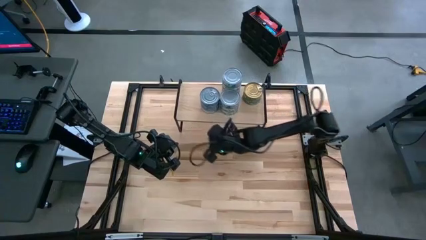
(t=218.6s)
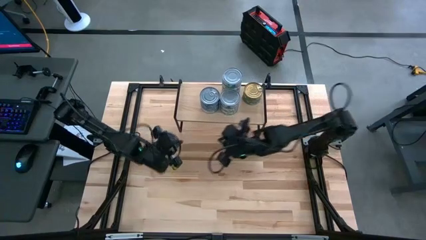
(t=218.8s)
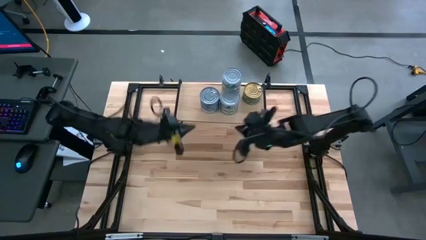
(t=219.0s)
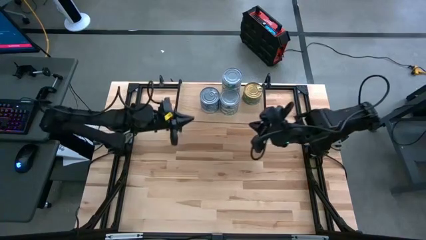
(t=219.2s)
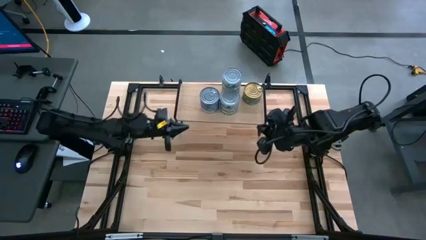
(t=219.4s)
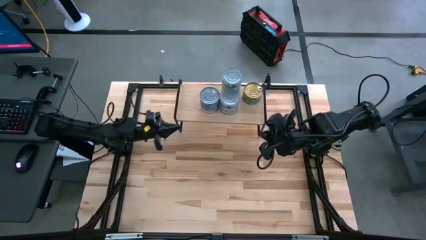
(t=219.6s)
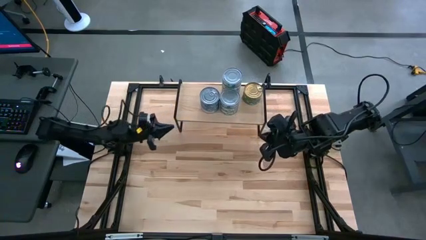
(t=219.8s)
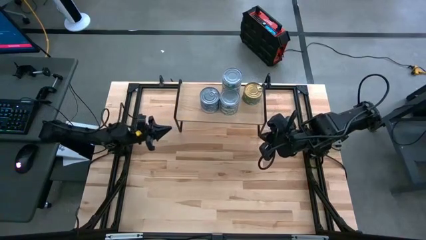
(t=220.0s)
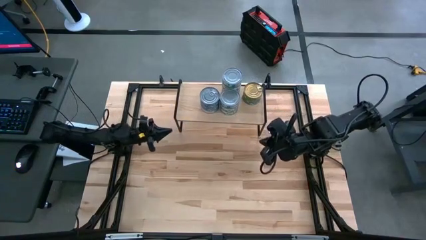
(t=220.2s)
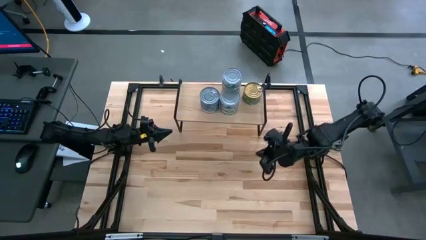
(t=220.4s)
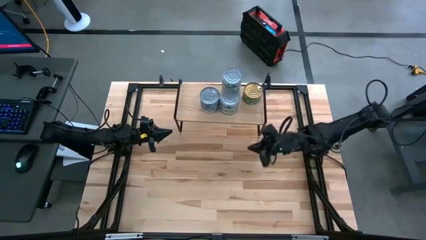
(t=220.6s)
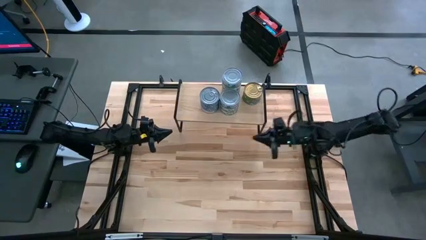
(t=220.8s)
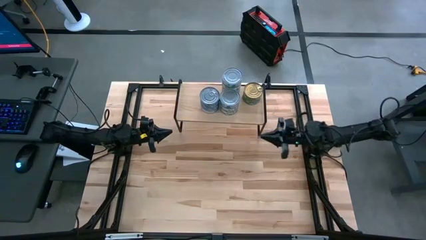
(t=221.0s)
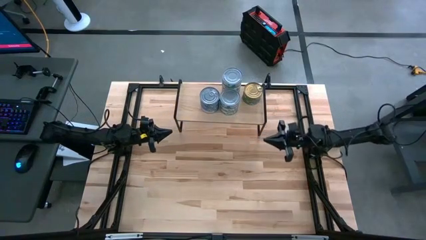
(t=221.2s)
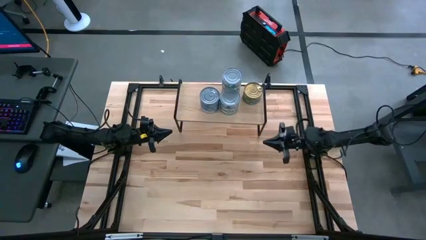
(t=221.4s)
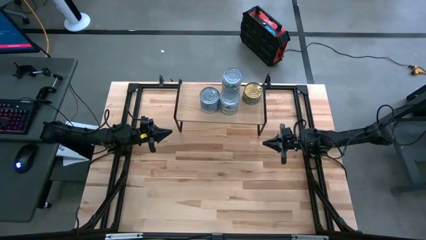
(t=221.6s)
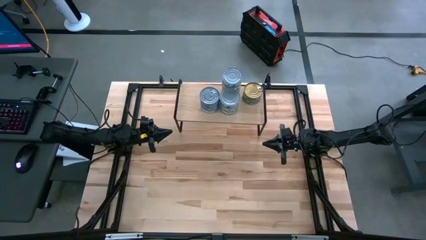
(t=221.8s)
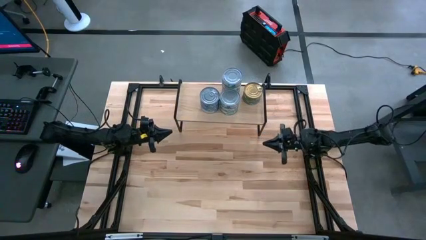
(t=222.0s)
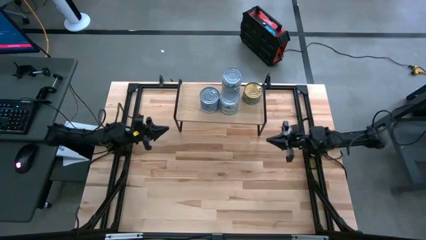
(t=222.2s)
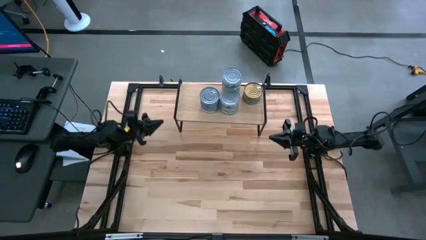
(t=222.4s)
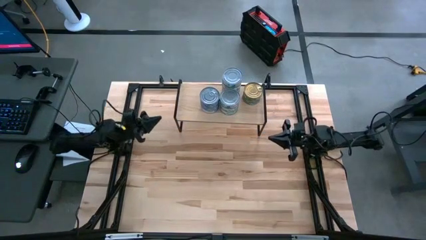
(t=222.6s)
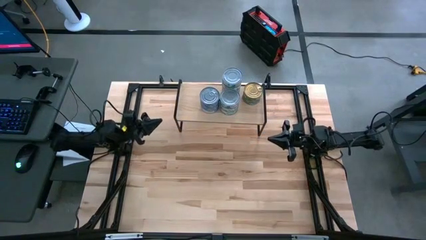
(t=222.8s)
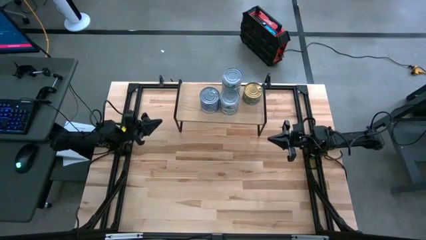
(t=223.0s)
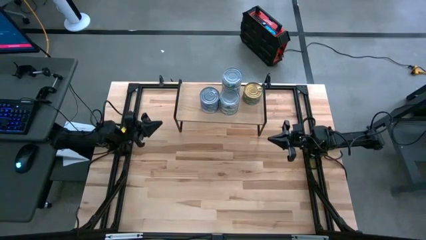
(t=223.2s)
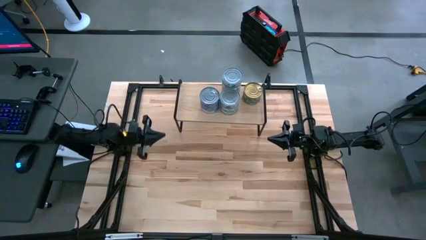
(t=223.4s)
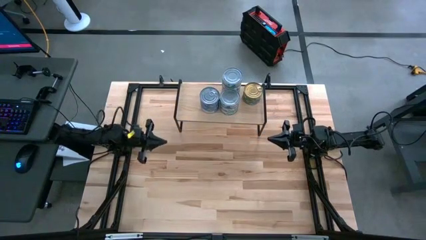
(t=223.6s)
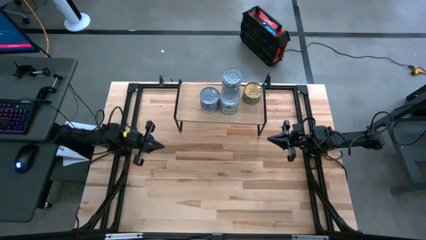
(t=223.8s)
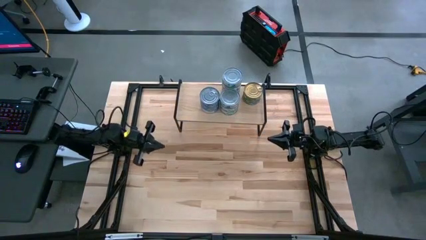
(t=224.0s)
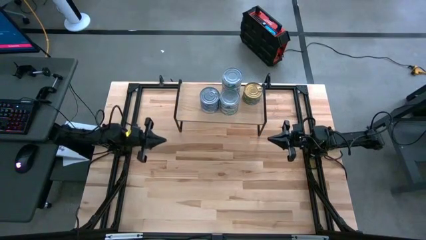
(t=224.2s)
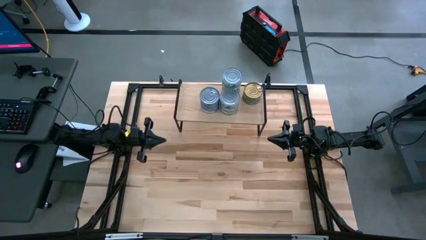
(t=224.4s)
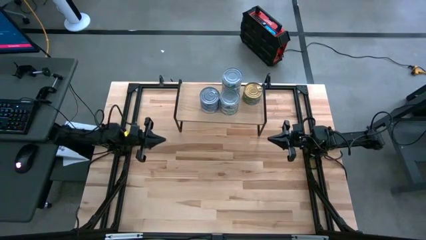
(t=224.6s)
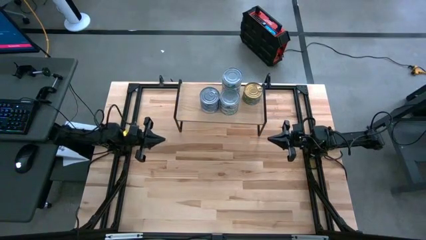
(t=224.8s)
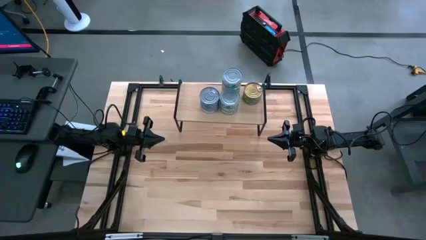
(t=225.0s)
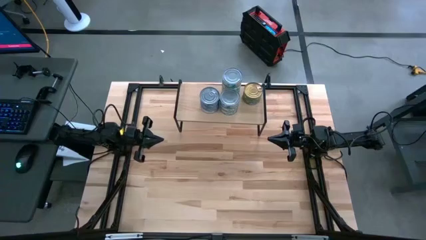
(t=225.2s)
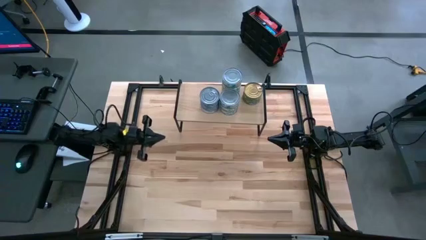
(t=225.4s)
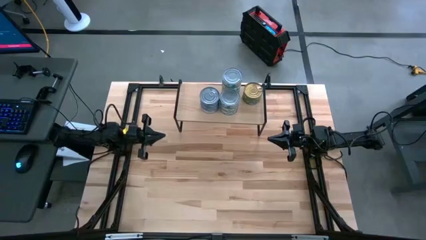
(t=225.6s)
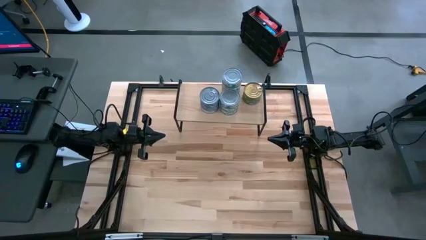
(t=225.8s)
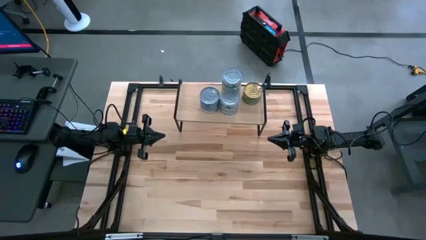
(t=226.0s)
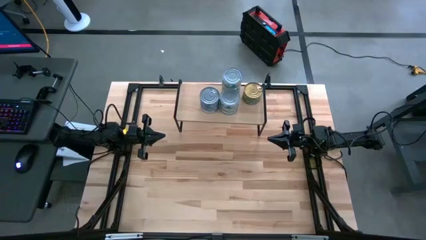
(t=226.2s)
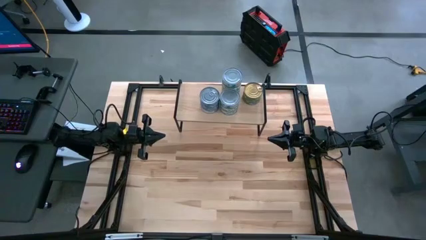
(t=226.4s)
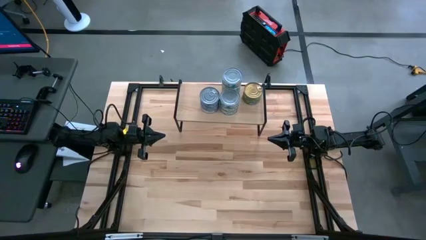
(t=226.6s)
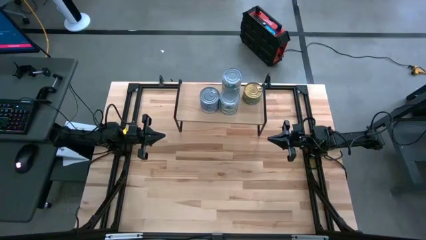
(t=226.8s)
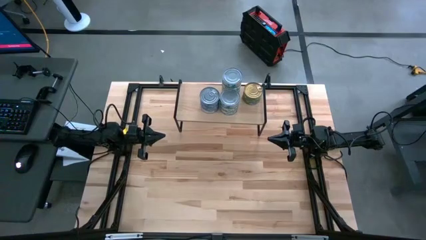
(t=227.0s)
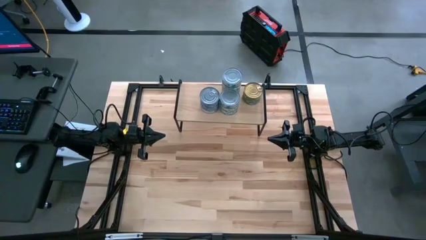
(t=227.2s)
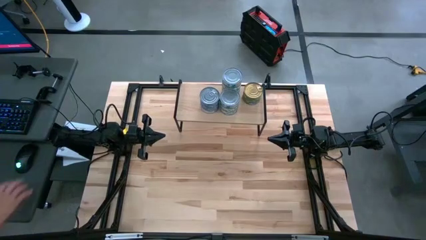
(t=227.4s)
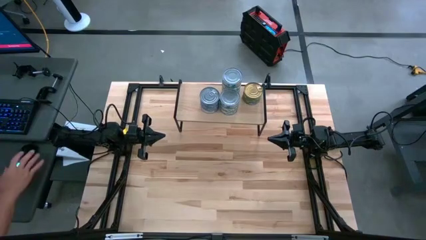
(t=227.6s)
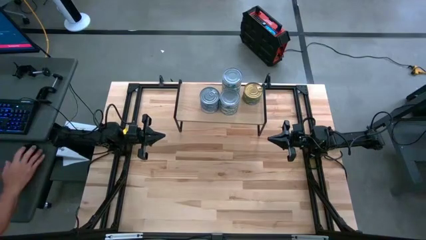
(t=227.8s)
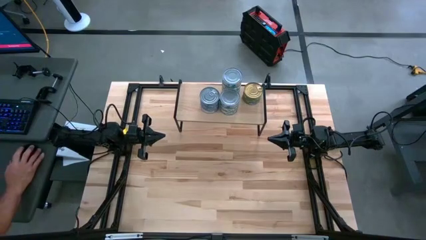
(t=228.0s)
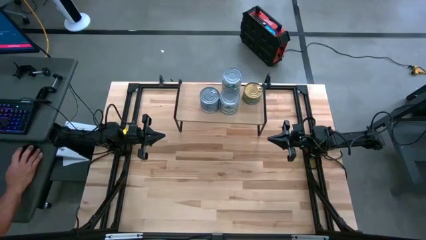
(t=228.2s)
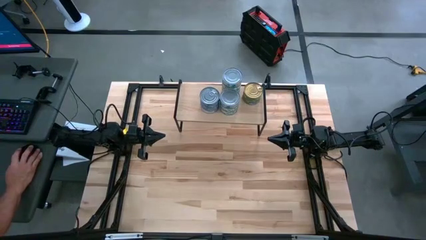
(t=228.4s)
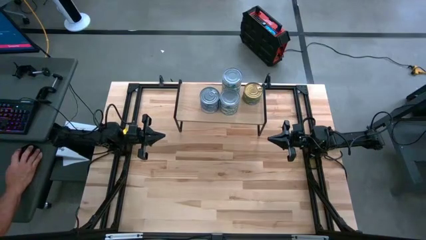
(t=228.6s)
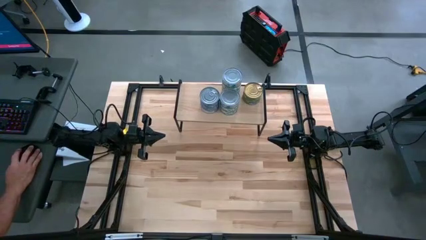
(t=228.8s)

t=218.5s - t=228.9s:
Task: Stack canned seafood by type on shelf
Return to Home Position

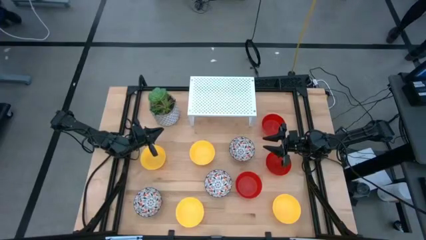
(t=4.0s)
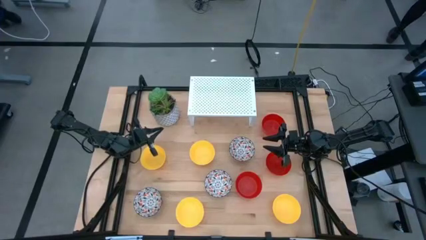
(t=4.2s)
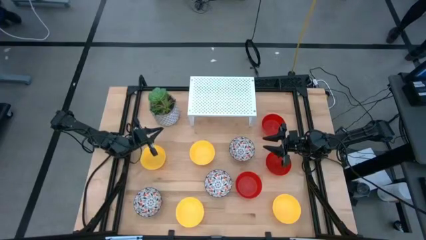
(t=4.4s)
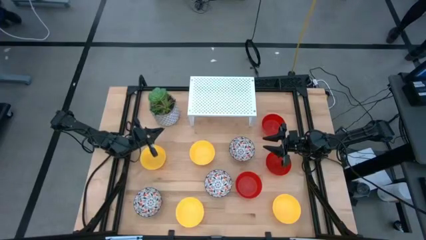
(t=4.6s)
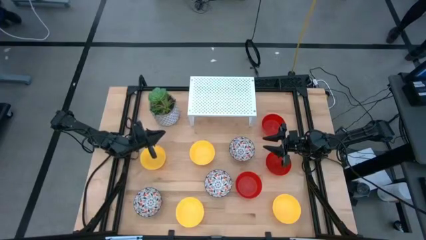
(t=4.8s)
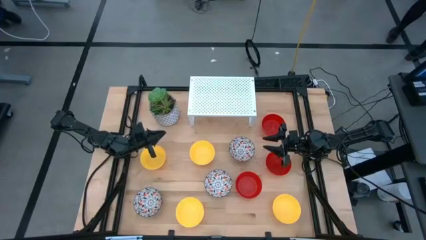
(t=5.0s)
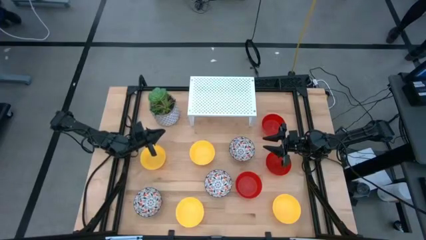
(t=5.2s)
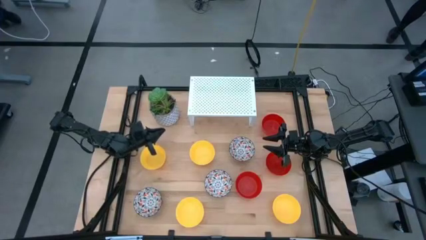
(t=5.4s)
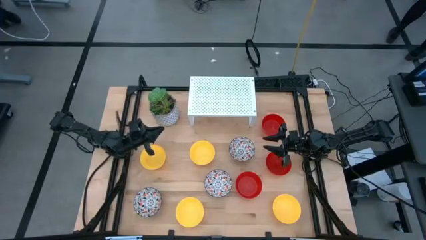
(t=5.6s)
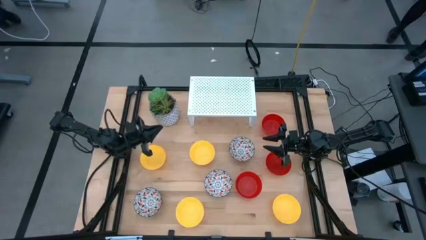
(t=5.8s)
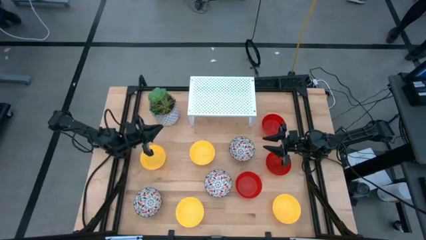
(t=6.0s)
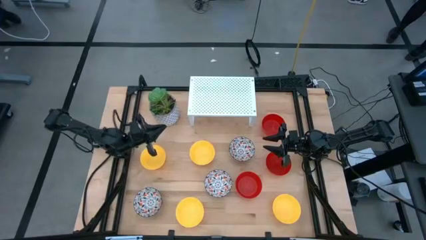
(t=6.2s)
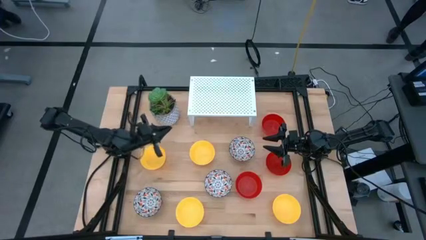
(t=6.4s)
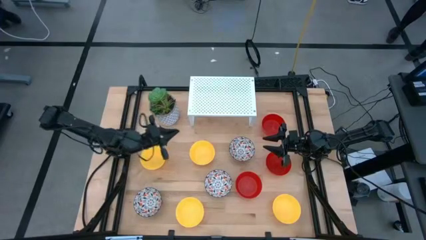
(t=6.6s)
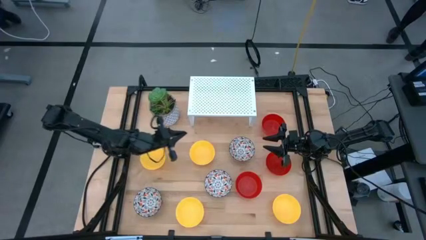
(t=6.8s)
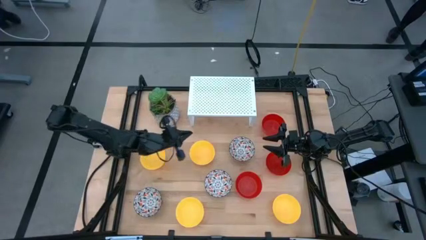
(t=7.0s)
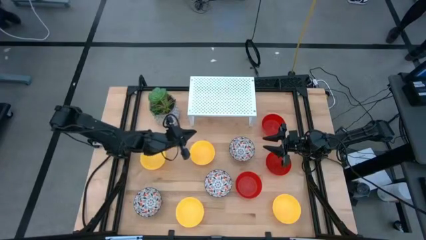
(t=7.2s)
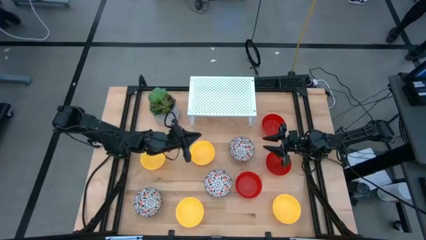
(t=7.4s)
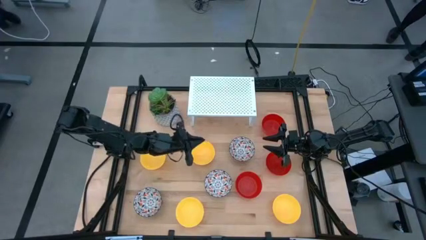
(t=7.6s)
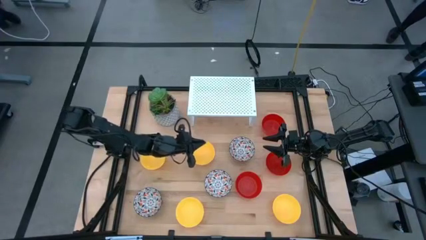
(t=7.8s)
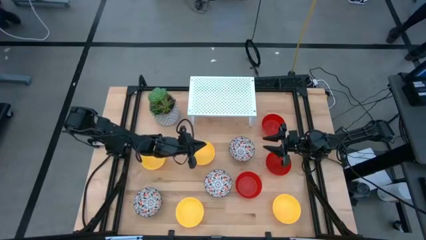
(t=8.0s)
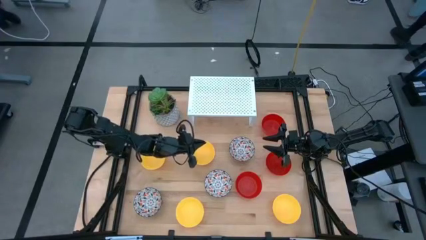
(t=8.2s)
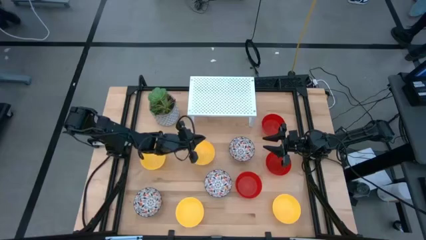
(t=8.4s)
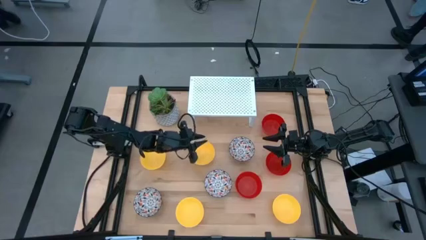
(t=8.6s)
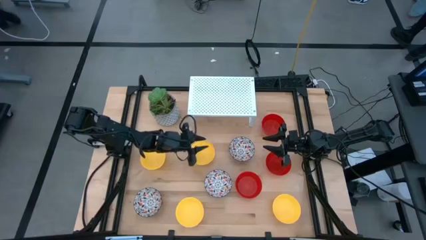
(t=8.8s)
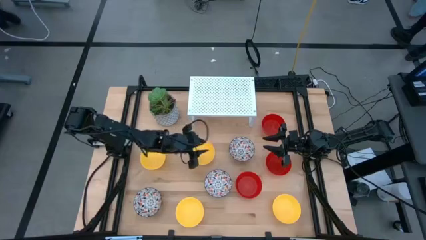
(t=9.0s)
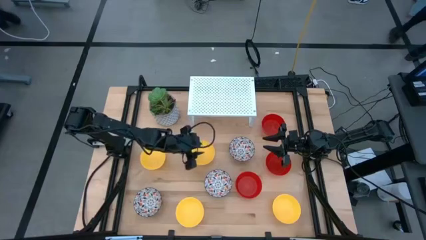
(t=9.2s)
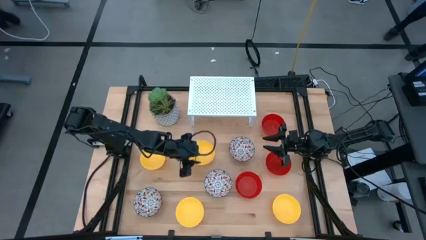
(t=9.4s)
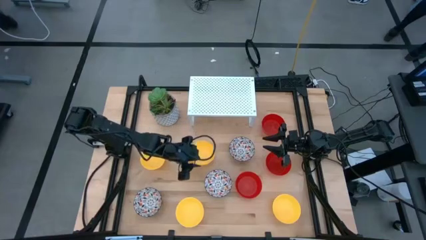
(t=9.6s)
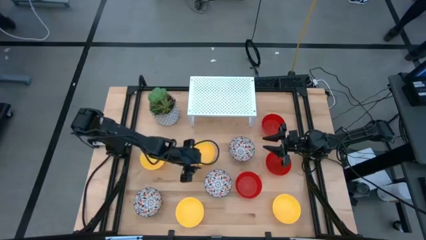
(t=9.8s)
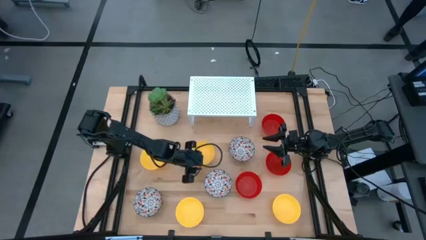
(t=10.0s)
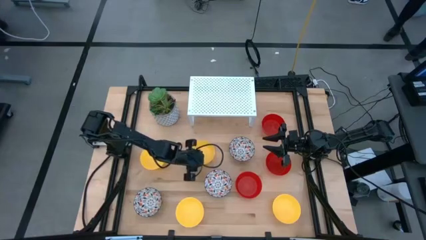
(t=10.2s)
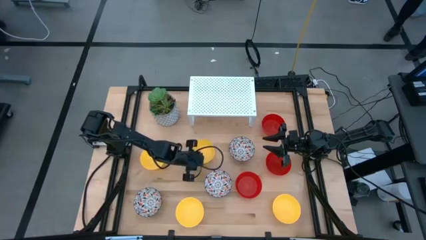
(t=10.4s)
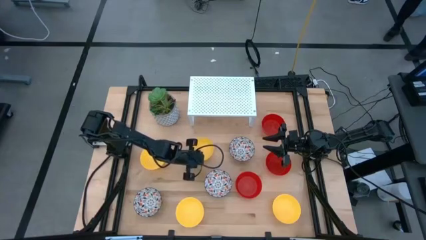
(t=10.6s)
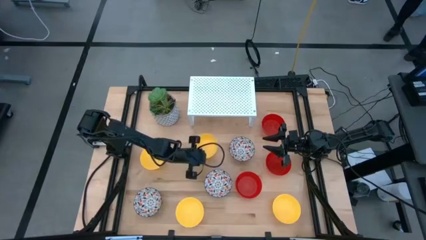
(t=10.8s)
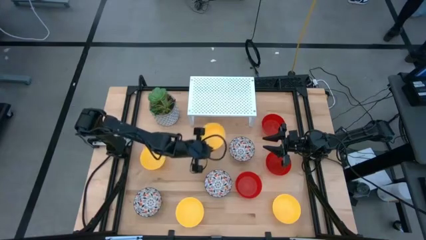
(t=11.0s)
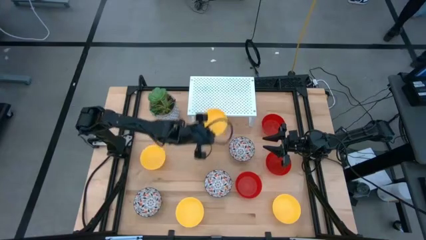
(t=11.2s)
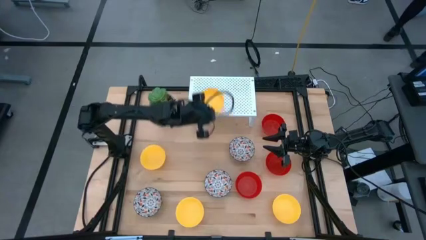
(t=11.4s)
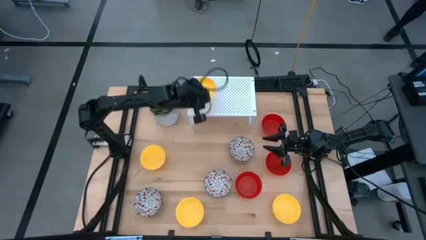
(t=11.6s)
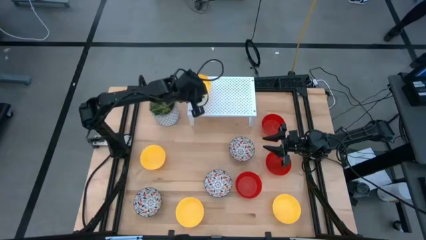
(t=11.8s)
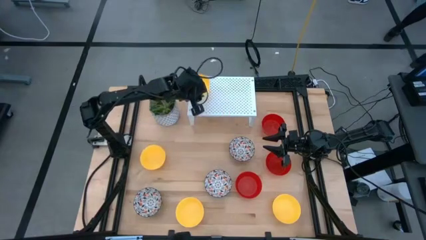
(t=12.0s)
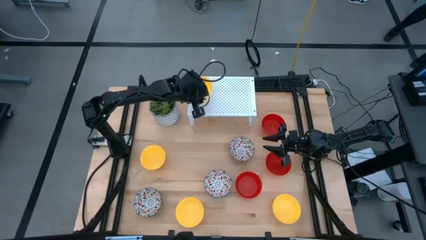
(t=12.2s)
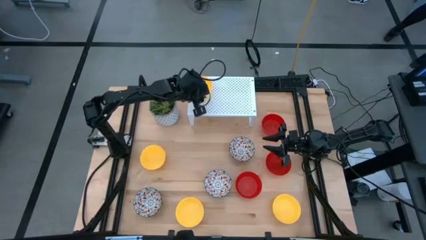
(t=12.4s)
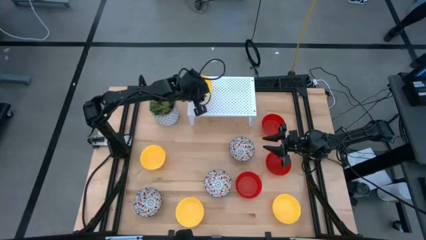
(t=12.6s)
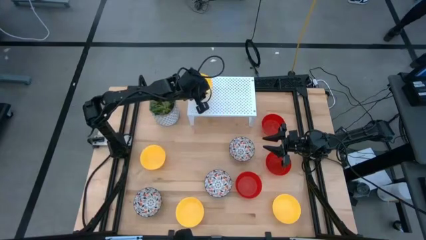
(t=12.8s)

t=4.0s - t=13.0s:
Task: Pick & Place Mini bowls
Put the yellow bowl on the shelf
